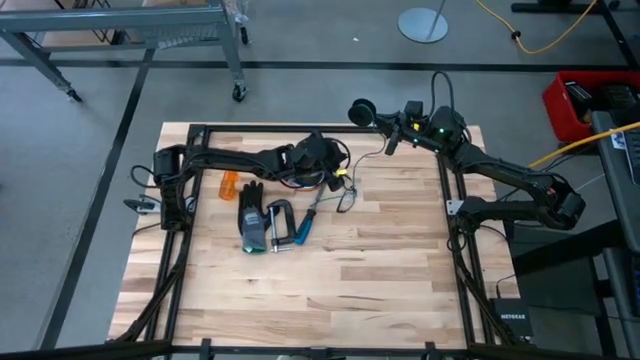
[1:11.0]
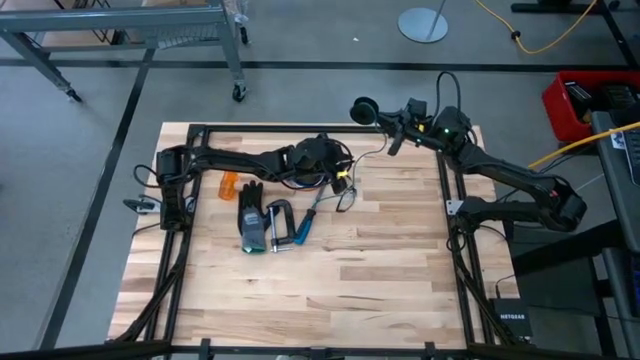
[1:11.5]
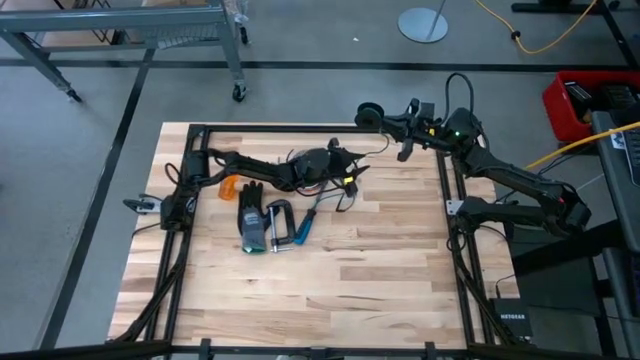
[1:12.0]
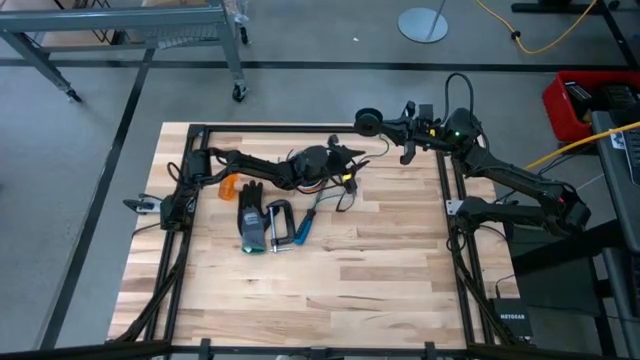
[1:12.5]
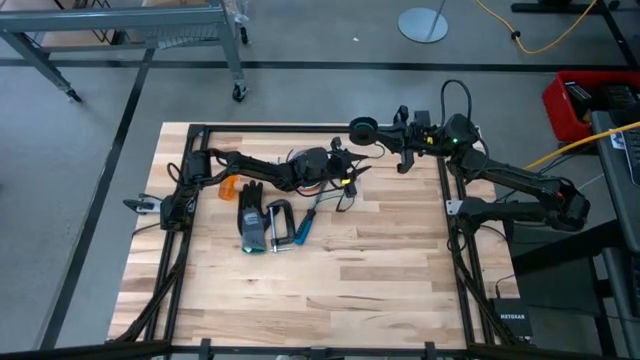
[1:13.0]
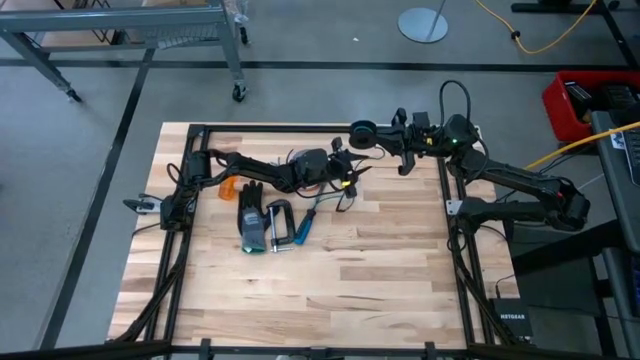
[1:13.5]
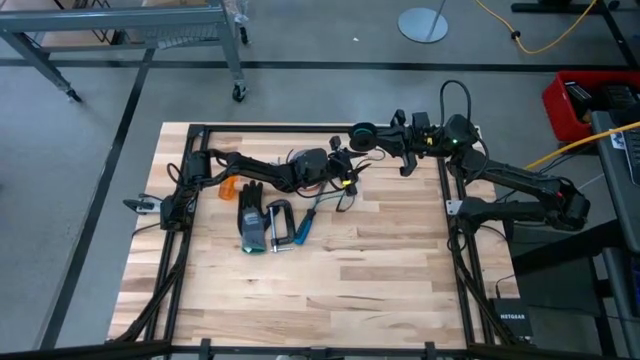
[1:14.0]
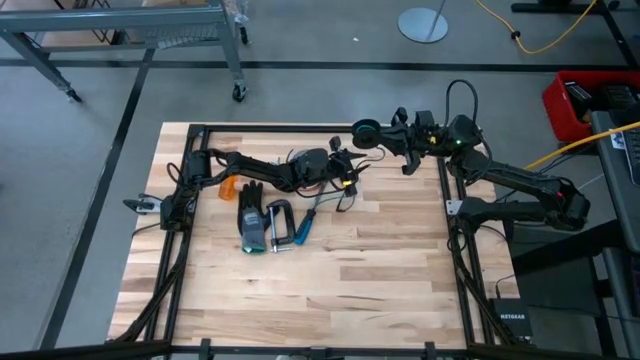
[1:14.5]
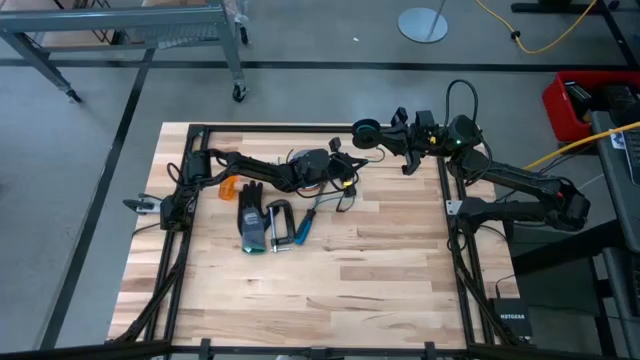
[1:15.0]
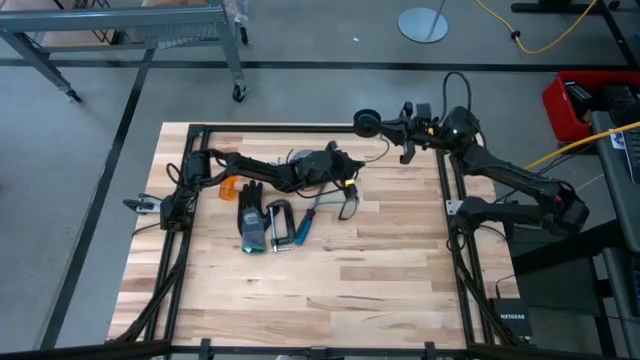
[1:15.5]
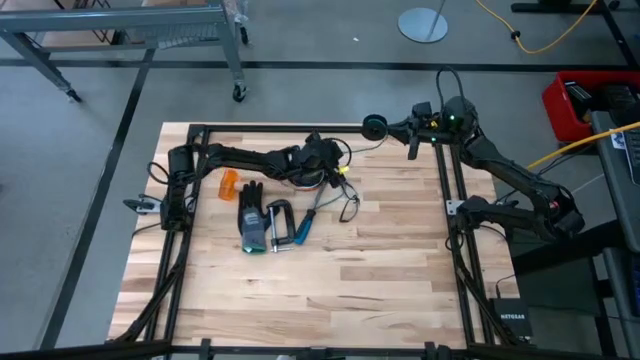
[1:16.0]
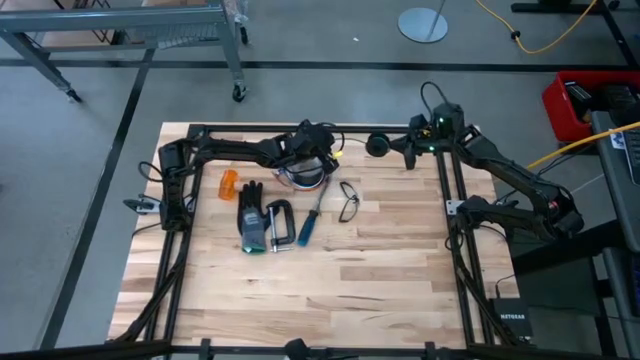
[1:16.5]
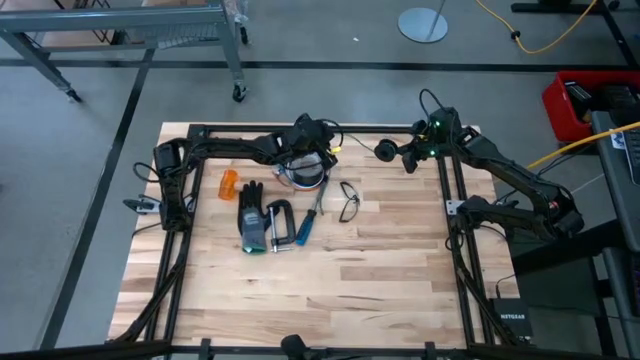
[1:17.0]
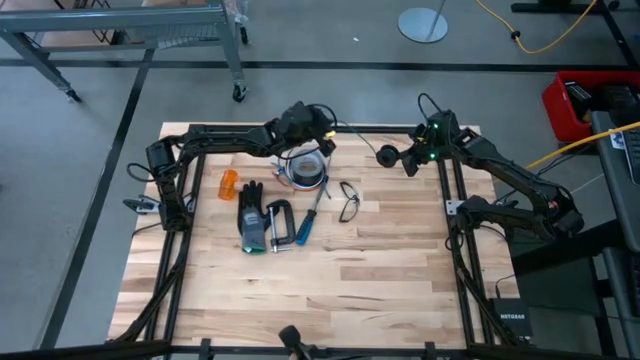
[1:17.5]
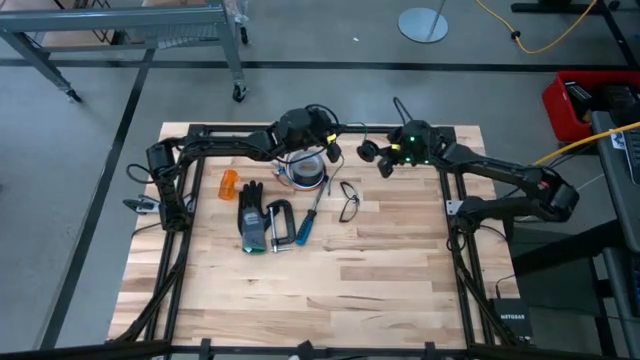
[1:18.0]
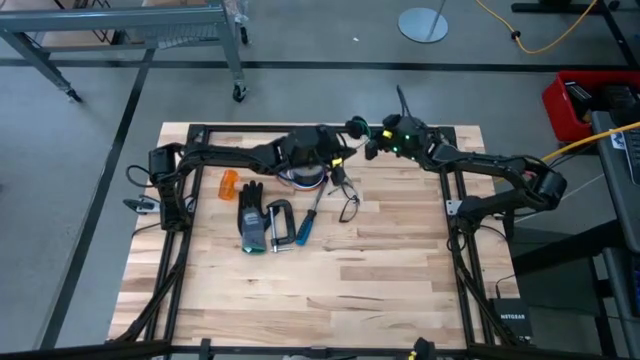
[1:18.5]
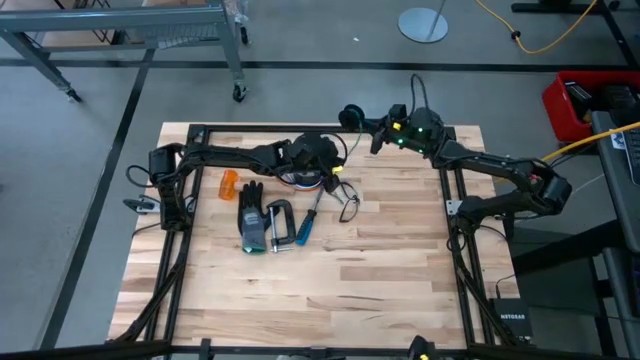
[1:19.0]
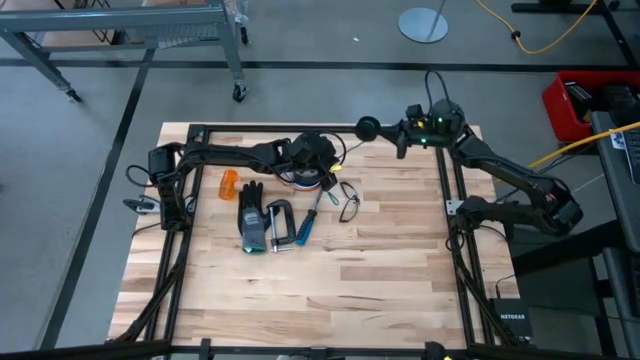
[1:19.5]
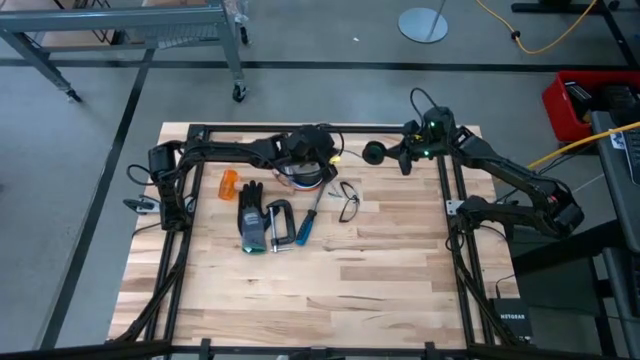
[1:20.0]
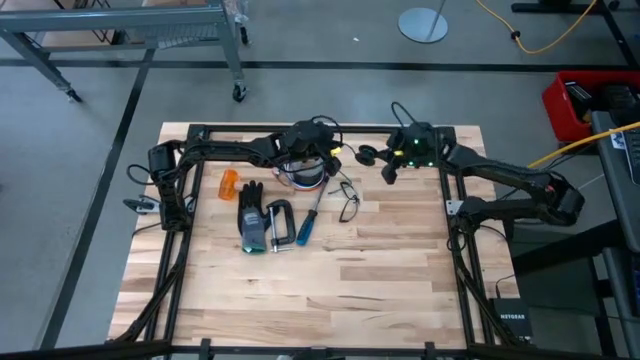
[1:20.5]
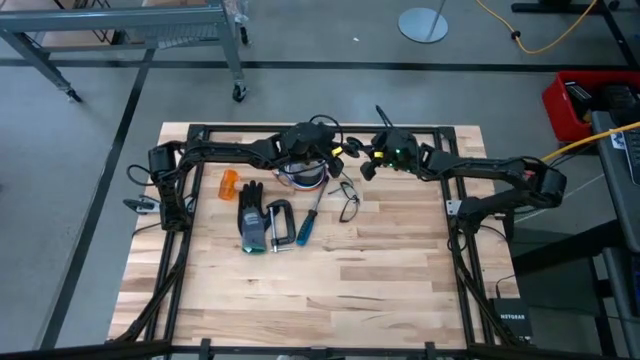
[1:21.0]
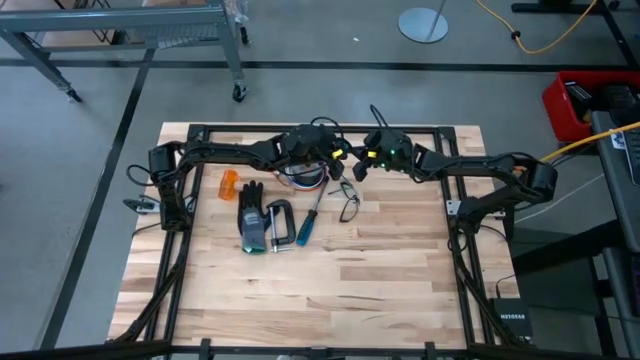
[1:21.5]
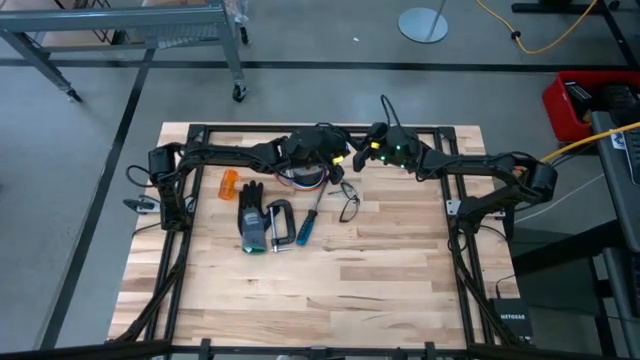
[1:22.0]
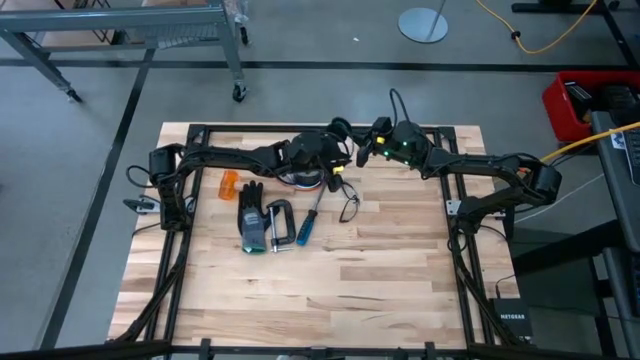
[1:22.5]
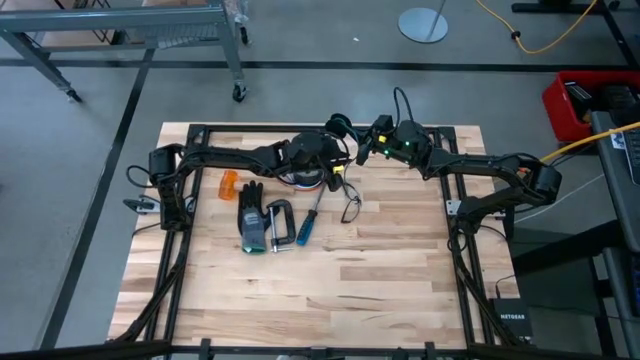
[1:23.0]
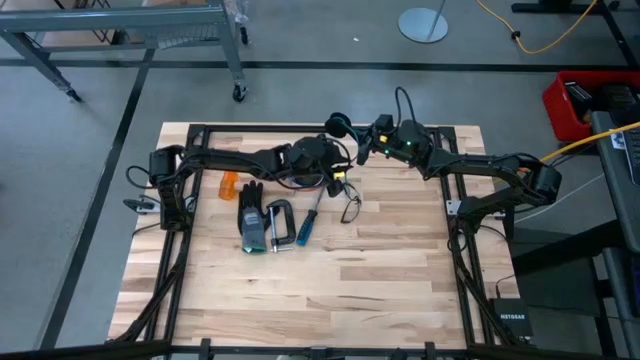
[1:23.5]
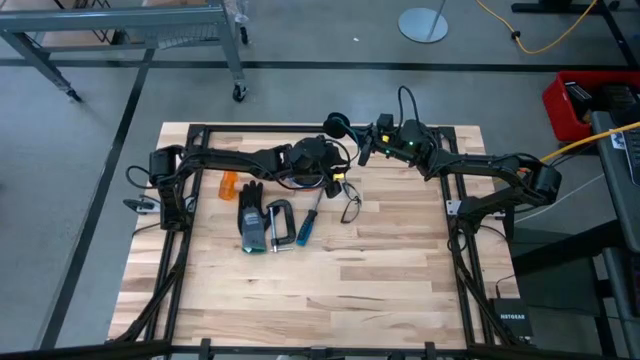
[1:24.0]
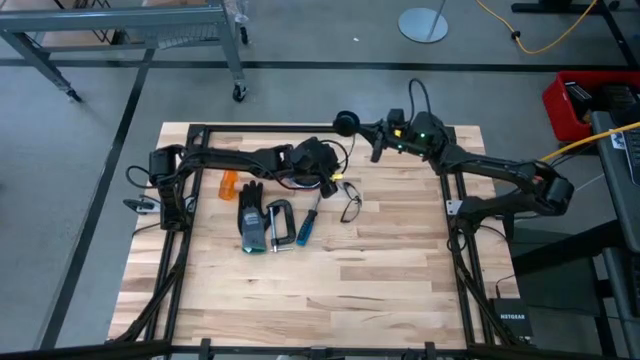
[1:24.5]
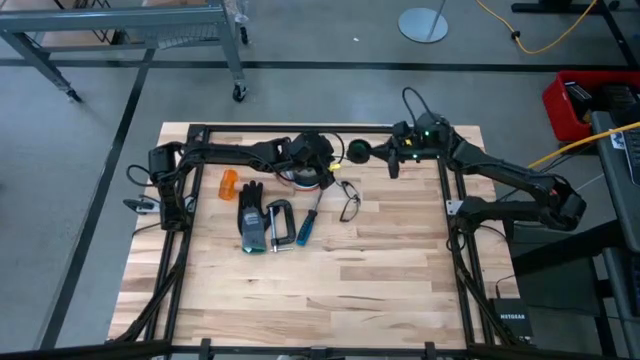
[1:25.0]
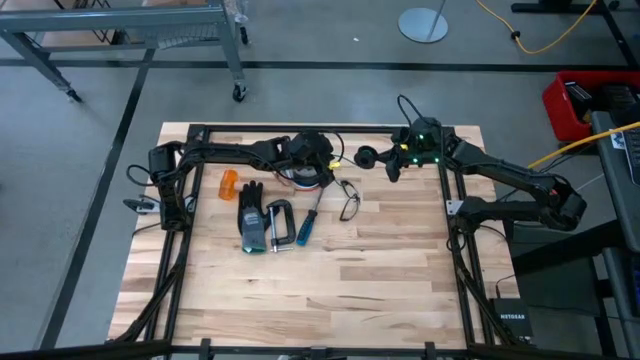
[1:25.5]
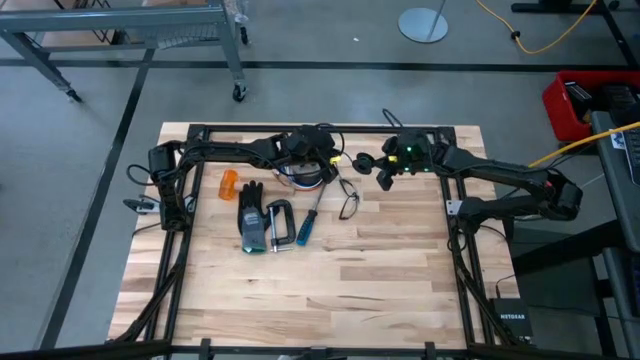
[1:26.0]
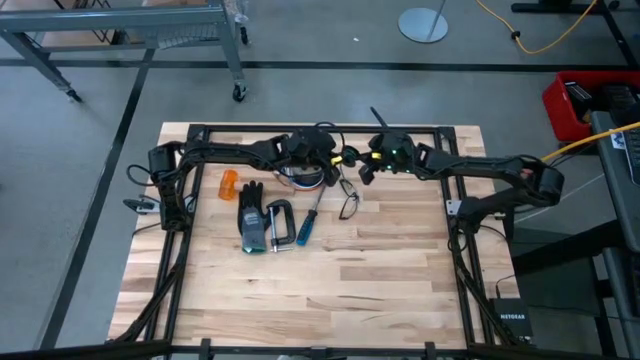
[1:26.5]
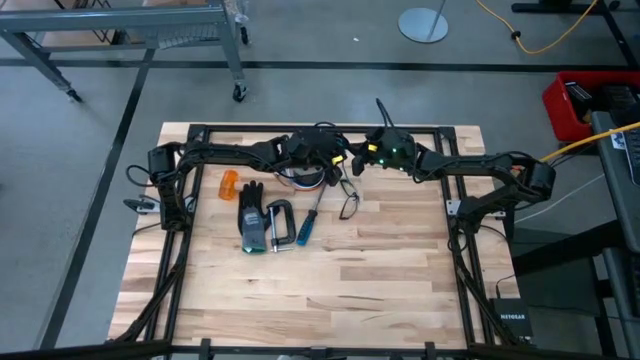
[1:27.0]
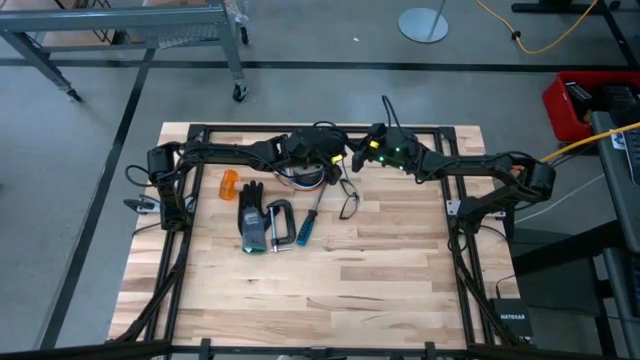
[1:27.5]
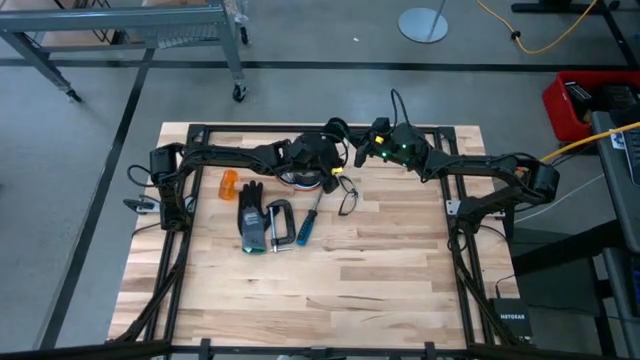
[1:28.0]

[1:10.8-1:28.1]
Task: Coil cords
Coil the wire in the cable spool

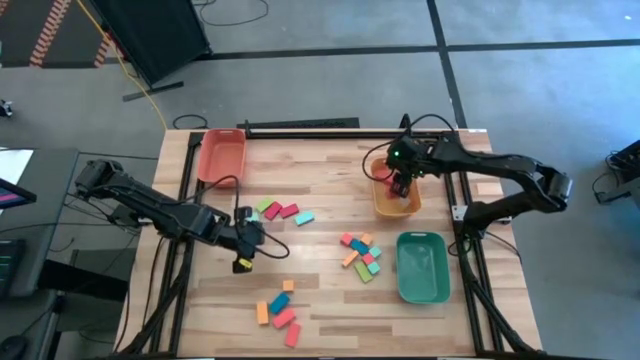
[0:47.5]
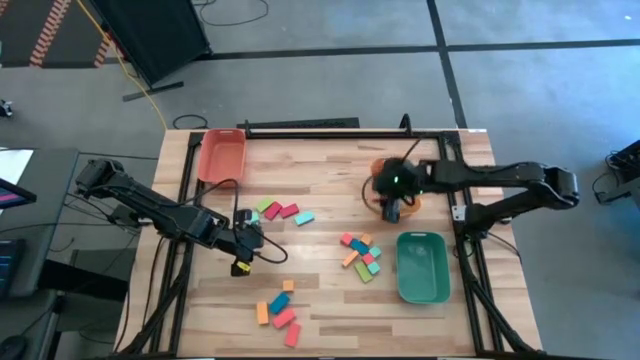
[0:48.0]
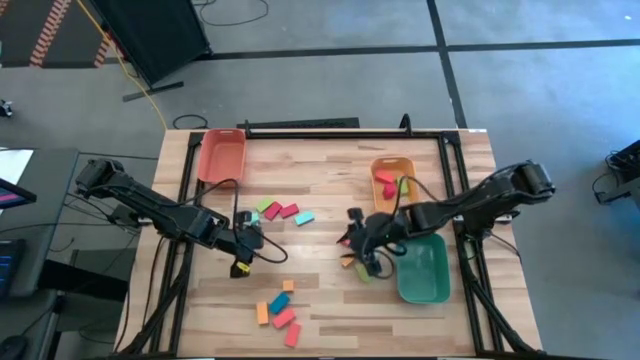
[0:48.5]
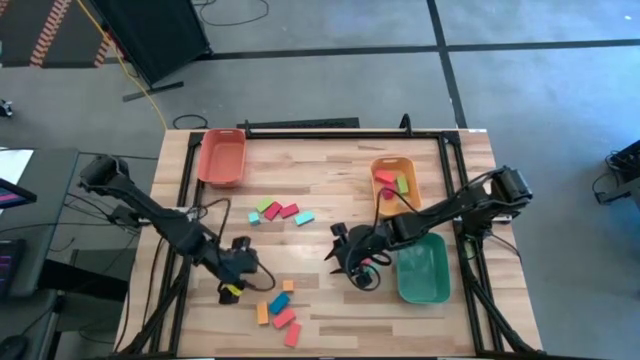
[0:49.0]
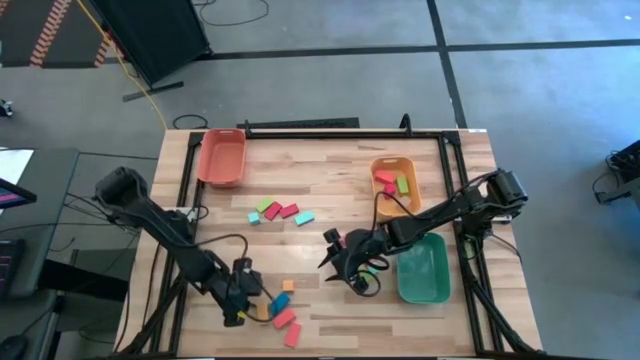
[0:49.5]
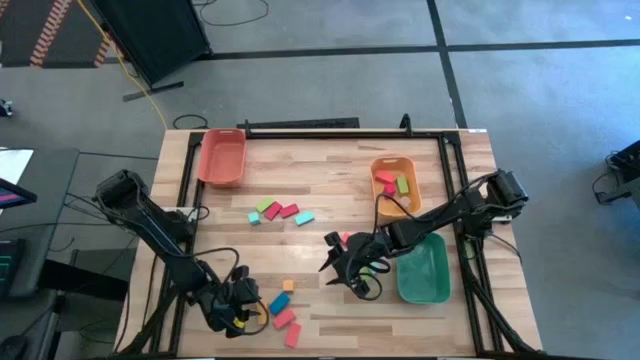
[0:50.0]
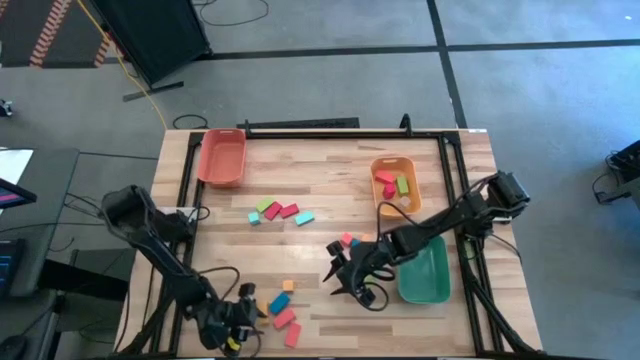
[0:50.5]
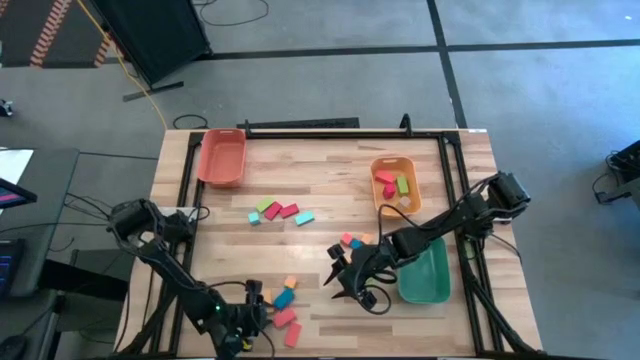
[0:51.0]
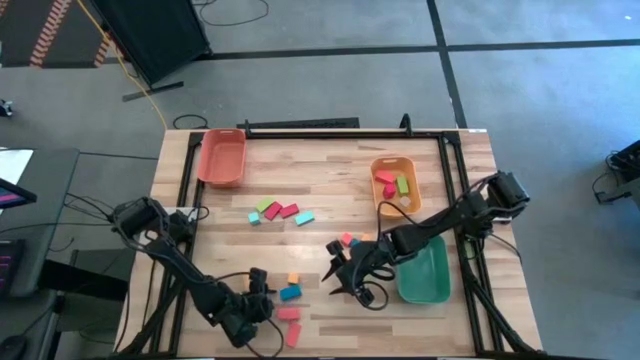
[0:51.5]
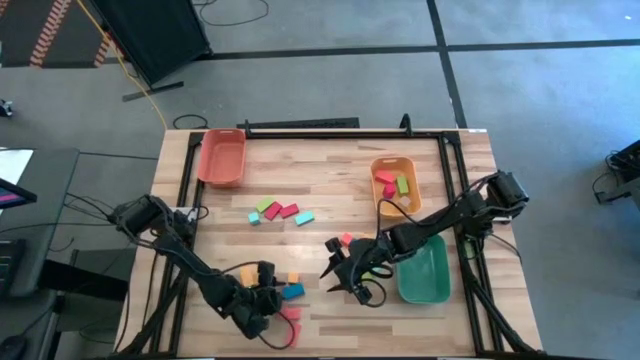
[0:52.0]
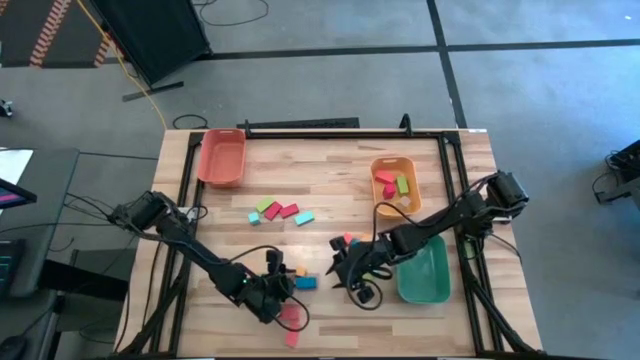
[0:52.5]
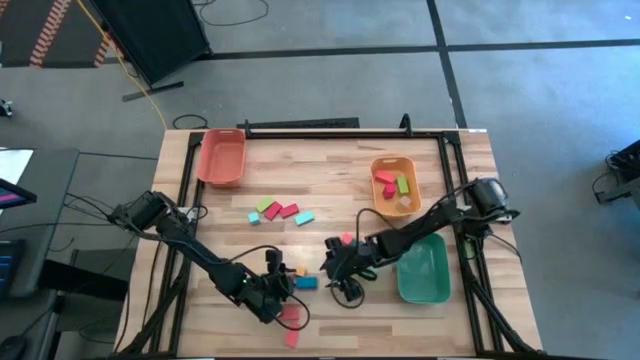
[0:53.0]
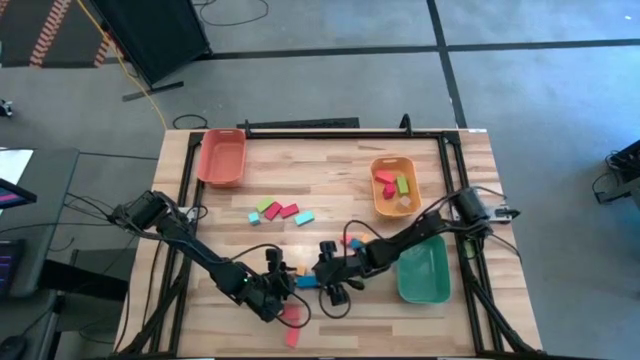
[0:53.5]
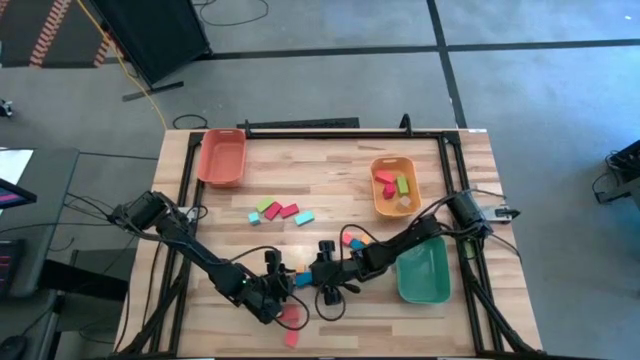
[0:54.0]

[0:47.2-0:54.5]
Task: Sort blocks by size
Put the large rectangular dark blue block into the yellow bin
